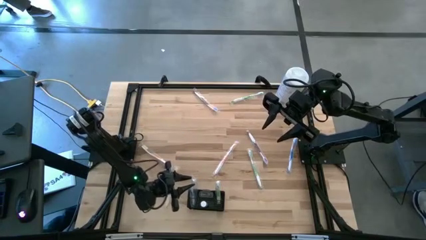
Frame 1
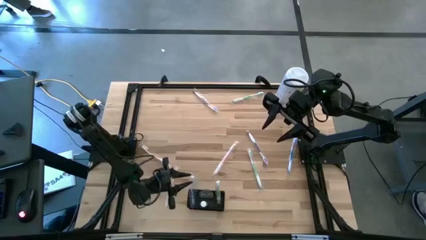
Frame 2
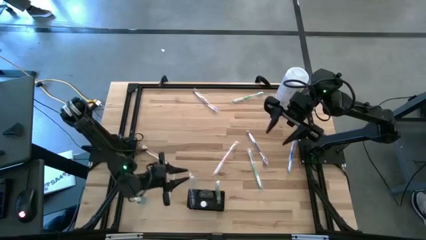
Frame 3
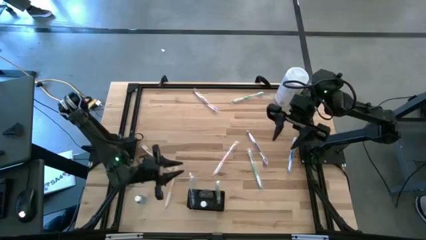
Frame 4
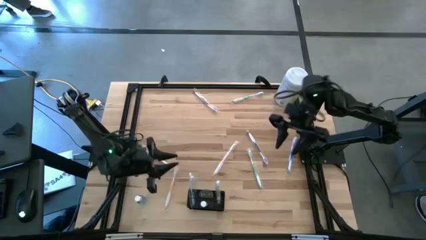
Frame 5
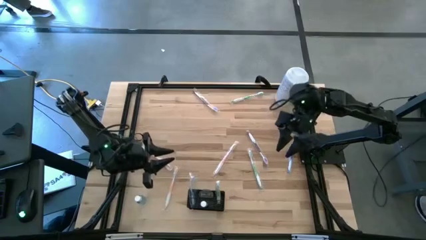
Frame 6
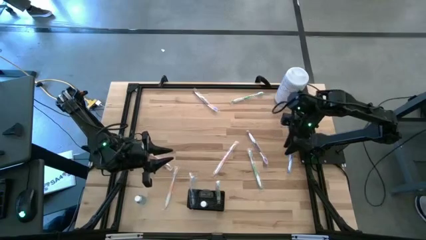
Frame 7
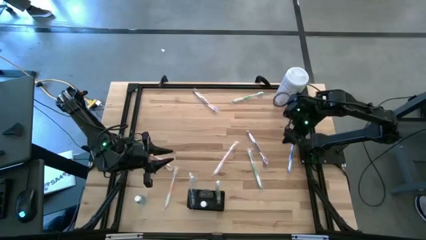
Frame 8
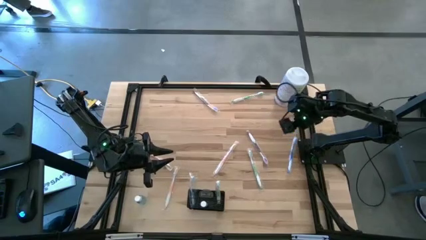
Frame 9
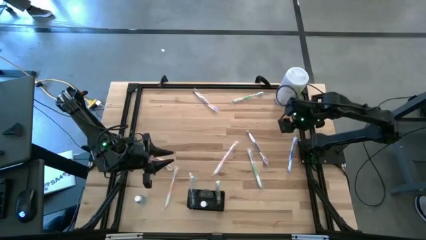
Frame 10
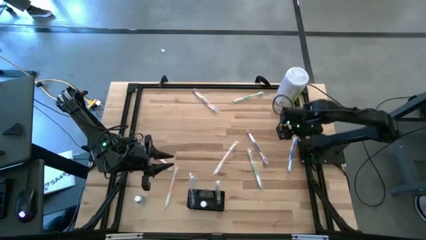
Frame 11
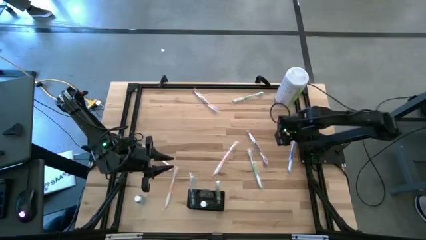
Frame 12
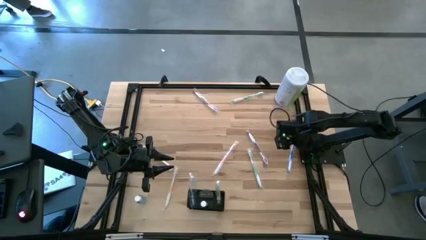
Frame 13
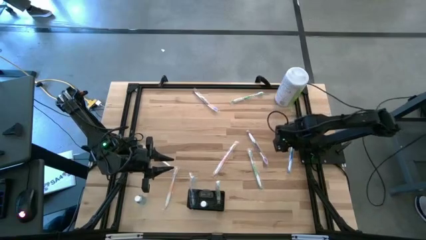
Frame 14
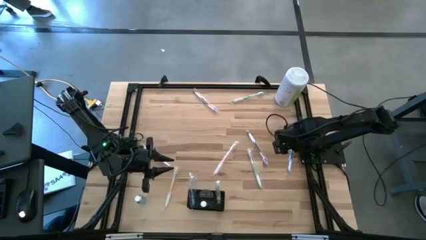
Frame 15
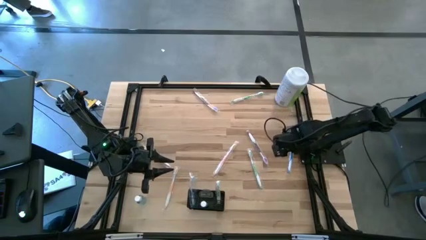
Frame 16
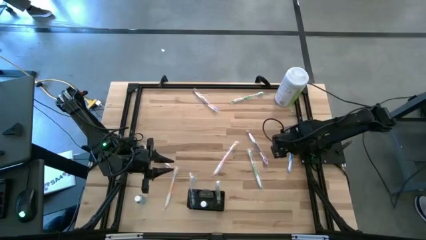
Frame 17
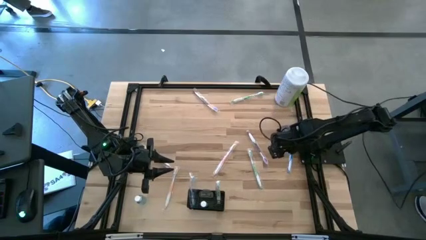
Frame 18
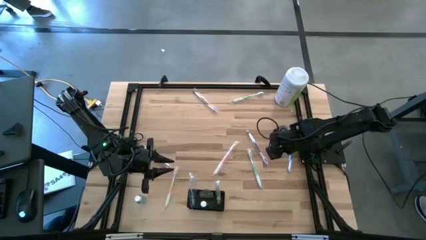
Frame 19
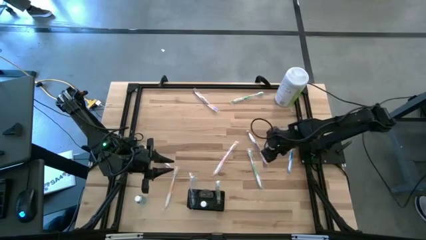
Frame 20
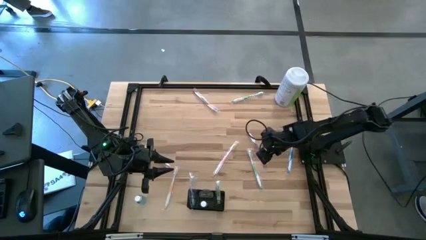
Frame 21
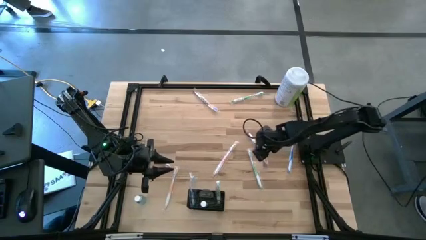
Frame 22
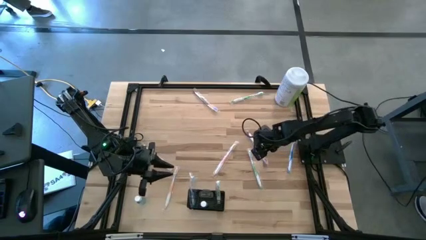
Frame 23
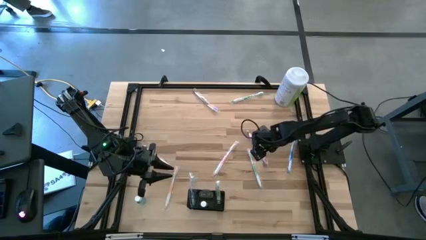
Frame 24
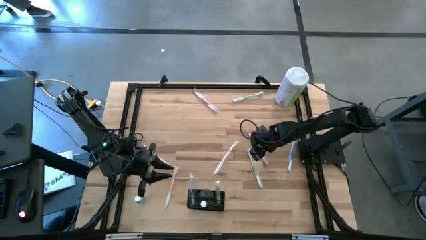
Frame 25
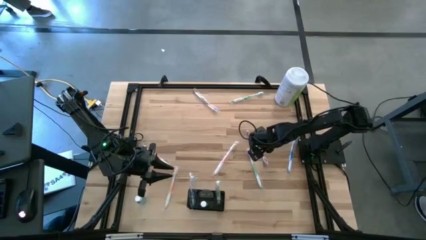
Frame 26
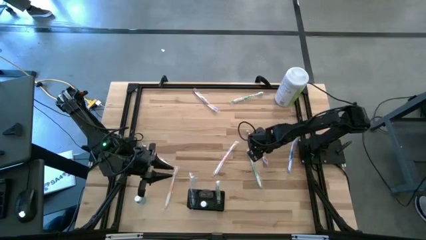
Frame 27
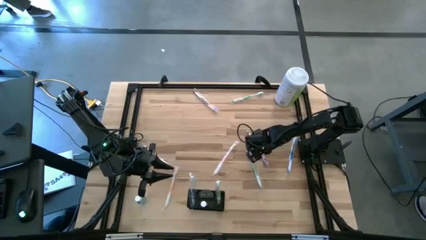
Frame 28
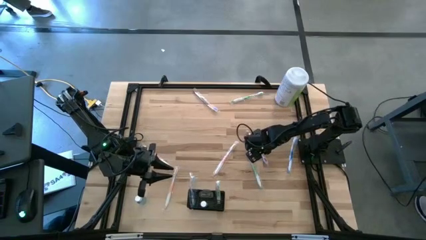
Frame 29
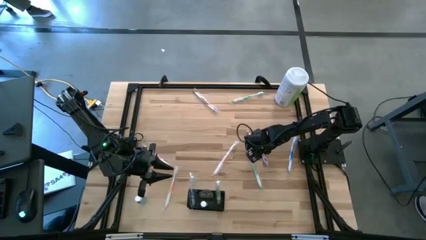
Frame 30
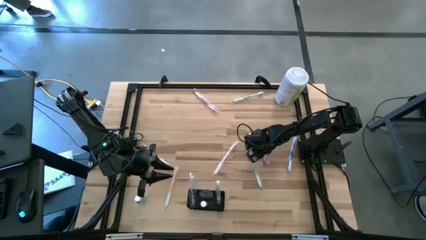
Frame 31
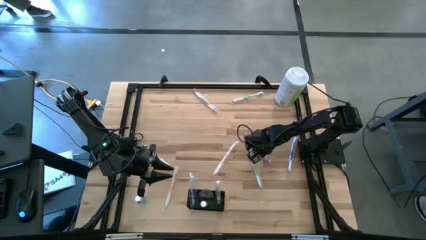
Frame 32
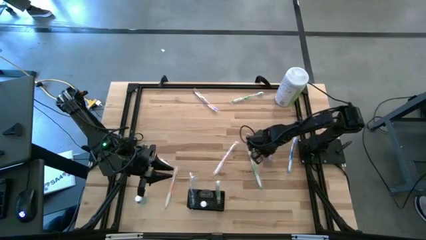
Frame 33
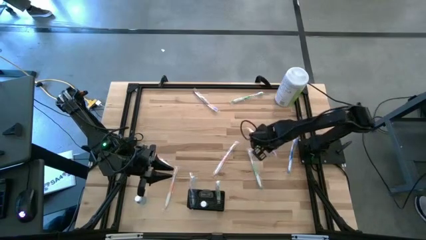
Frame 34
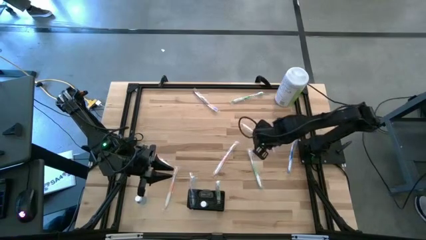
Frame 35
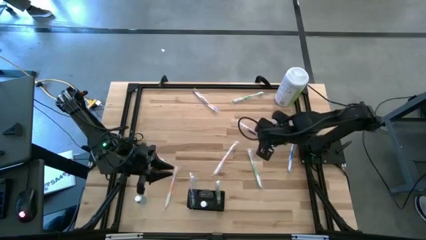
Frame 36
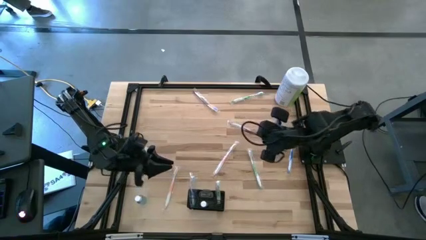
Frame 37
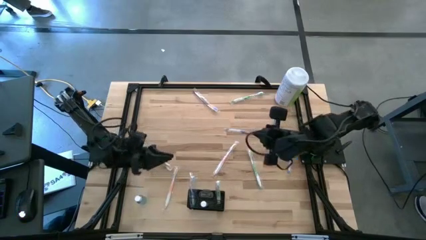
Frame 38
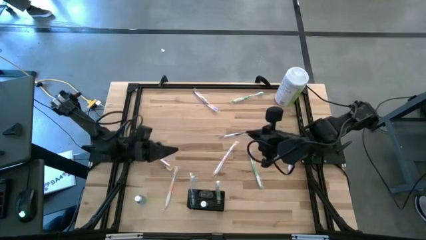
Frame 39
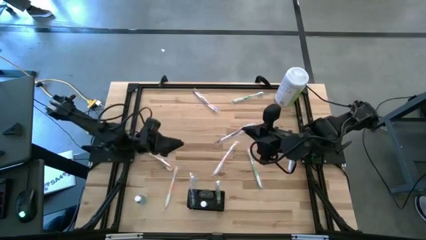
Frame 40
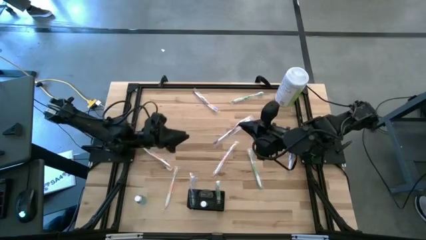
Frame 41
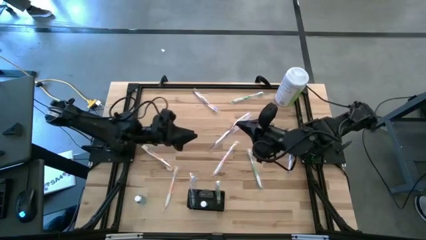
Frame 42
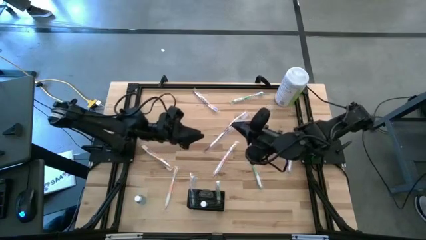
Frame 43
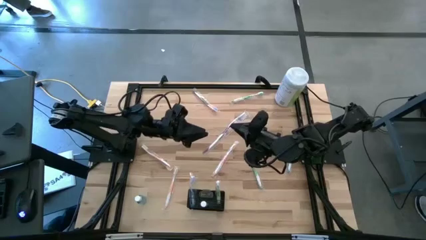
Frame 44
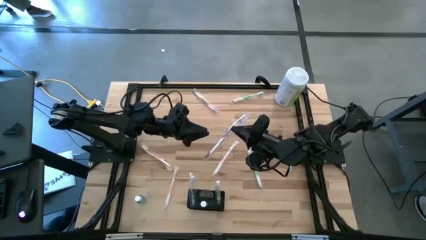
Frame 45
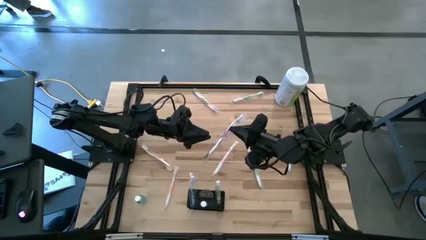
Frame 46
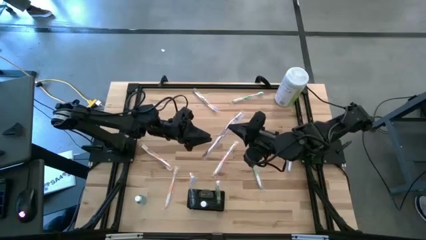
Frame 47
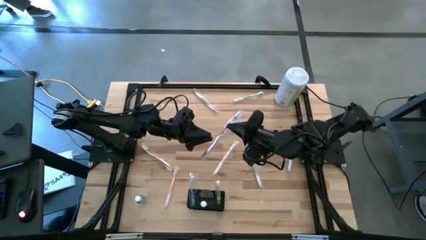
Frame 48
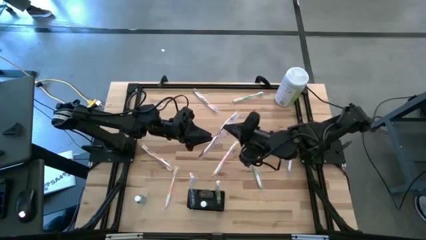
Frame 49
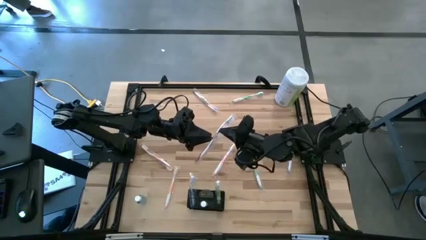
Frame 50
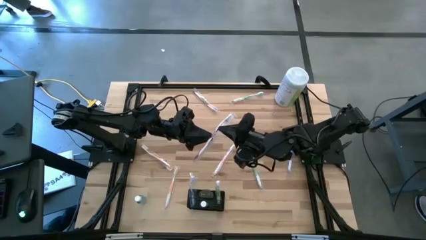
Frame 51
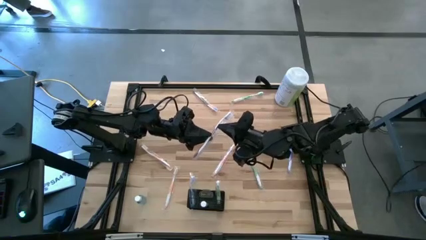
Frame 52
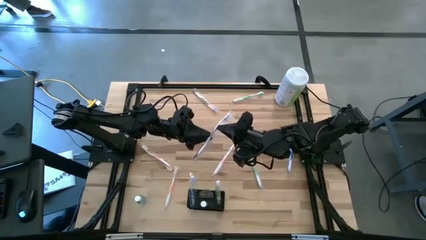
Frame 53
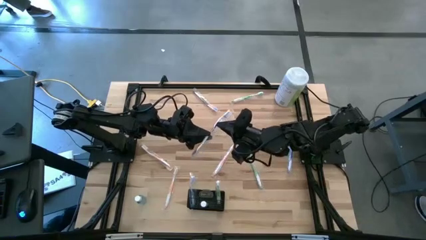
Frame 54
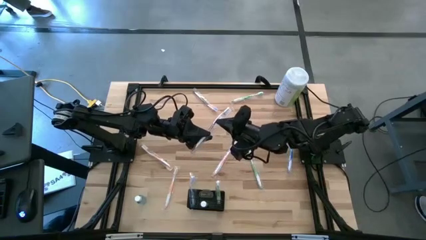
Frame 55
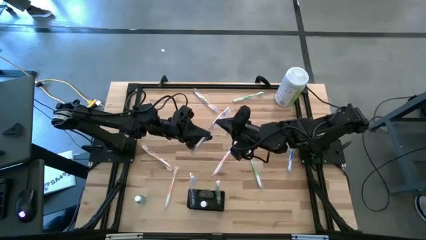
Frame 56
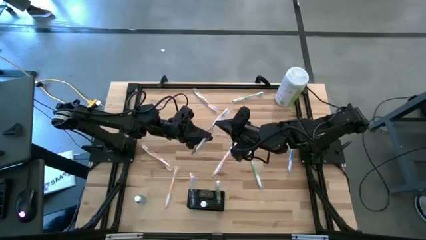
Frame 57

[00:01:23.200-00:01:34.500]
Task: Pick & Place toothbrushing station
Put the bottom purple toothbrush into the black wire organizer

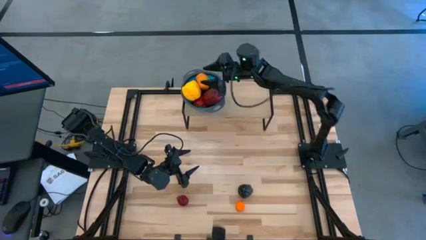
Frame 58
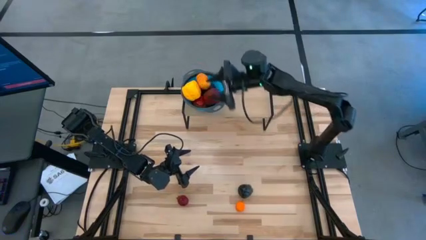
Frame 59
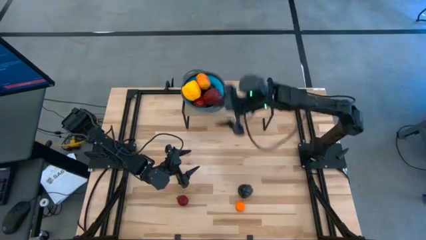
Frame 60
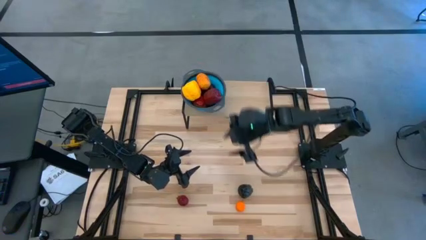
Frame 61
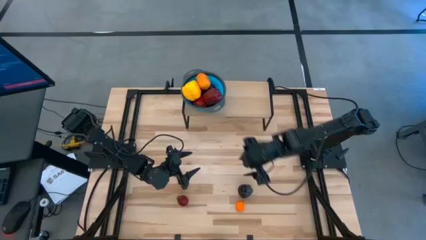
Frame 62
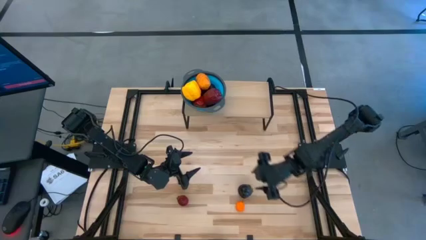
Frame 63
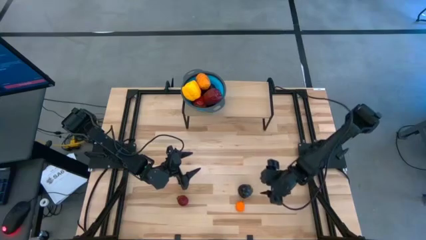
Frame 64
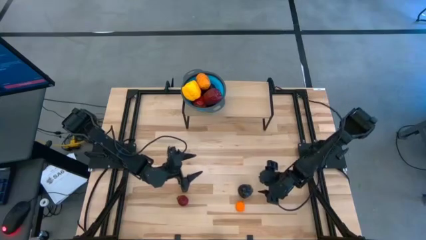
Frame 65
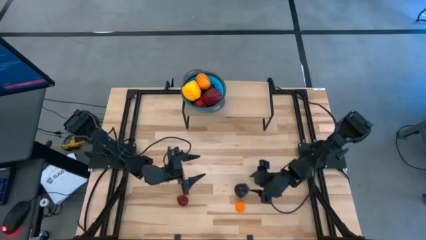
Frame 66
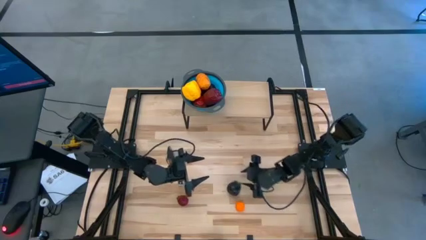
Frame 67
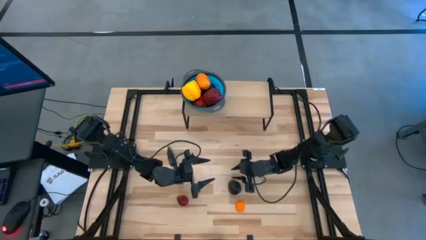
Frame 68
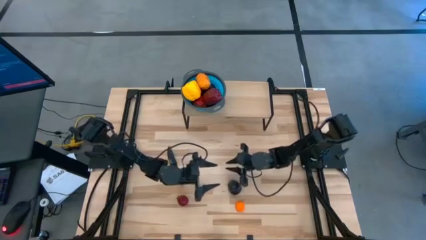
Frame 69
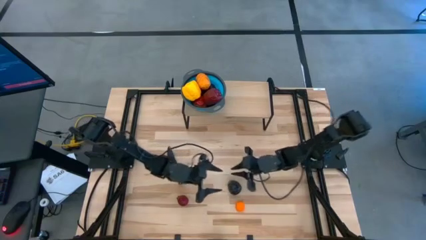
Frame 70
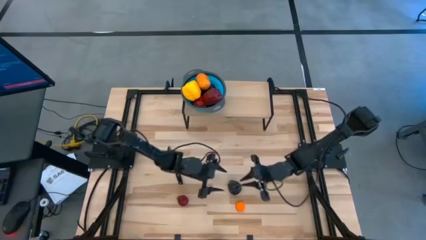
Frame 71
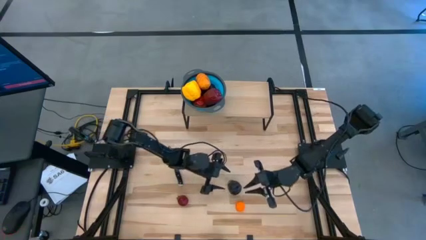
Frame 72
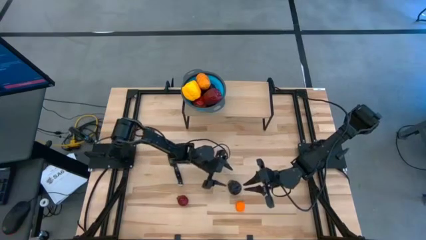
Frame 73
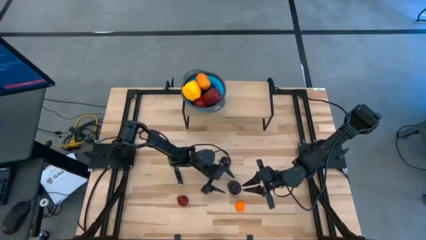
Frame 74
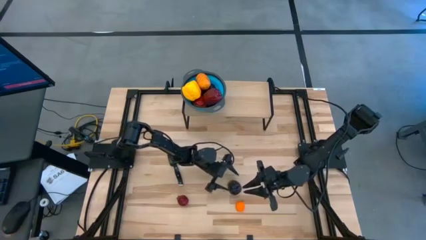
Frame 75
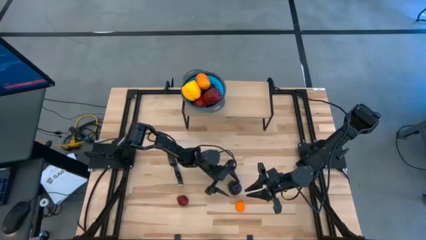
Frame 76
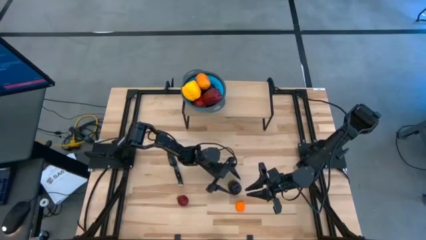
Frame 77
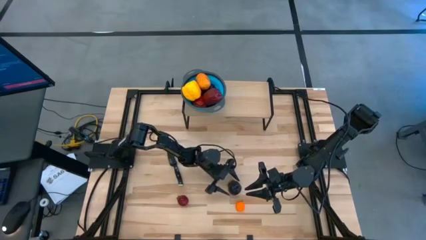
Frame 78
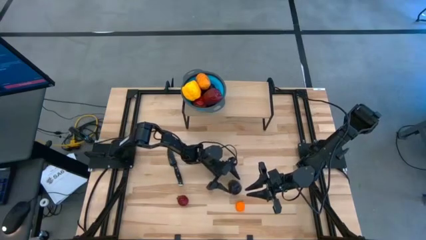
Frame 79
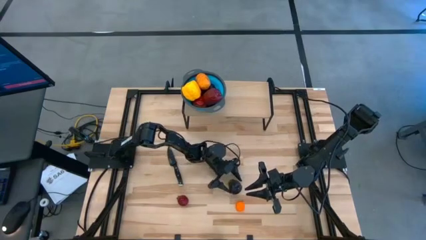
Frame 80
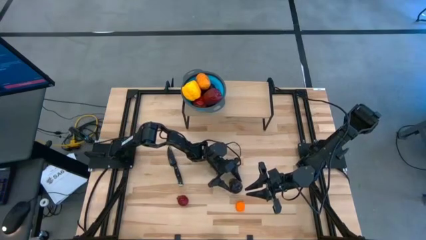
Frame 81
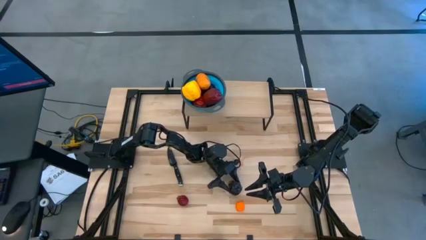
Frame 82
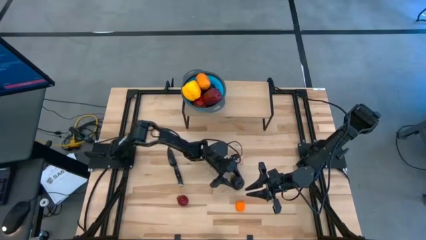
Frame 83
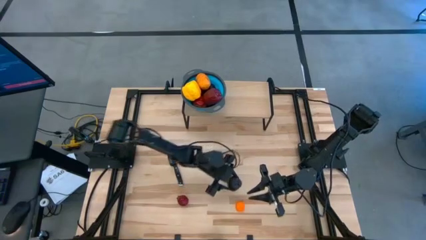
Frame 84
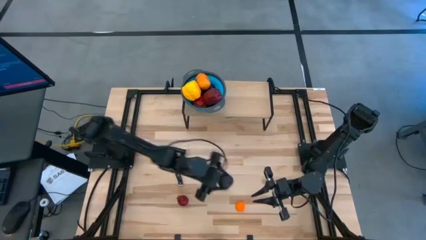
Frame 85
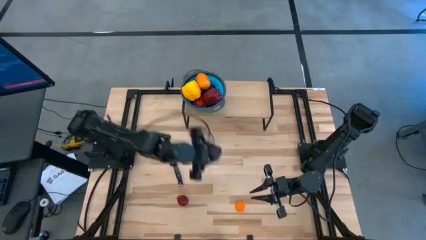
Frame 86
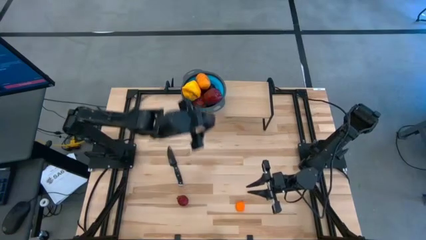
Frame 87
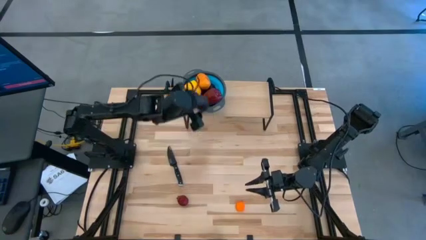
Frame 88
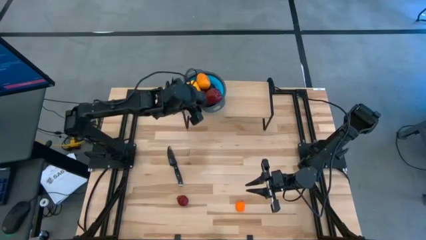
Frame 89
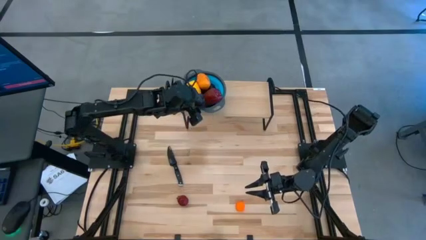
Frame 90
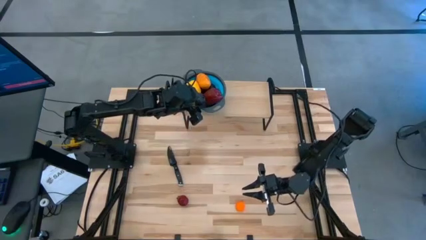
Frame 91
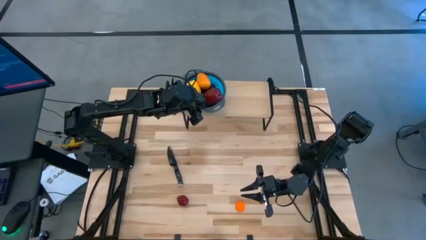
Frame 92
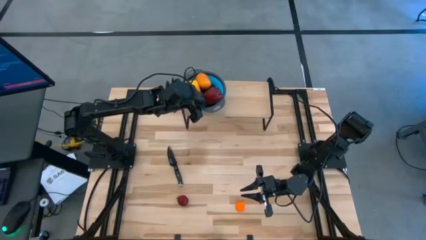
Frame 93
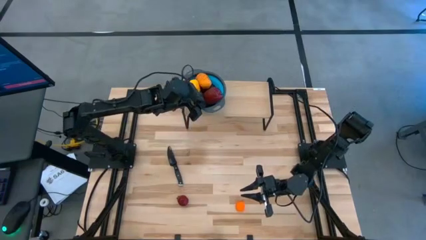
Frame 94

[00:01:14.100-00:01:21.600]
Task: Pick & Place Fruit
Put the purple mangosteen into the blue strainer bowl on the shelf
